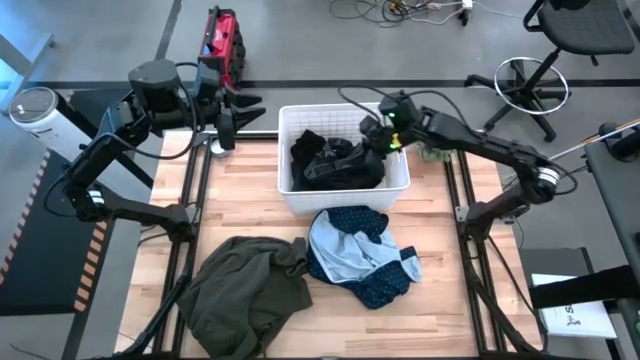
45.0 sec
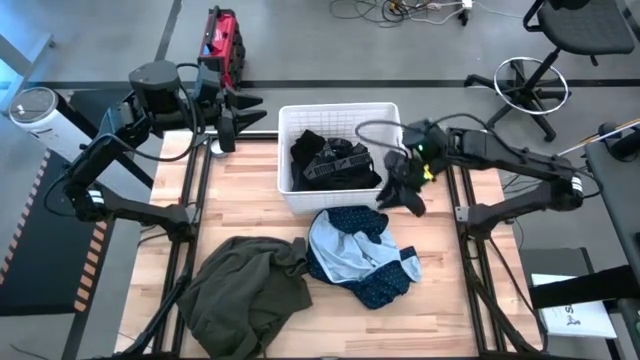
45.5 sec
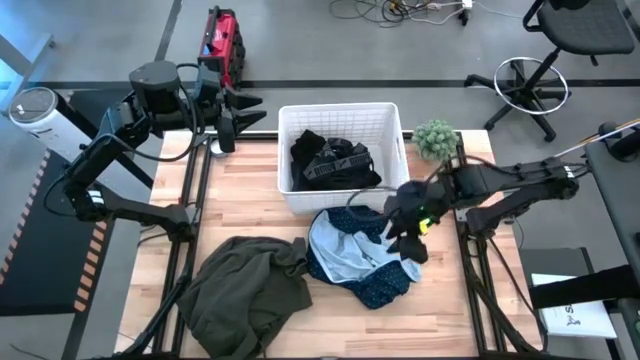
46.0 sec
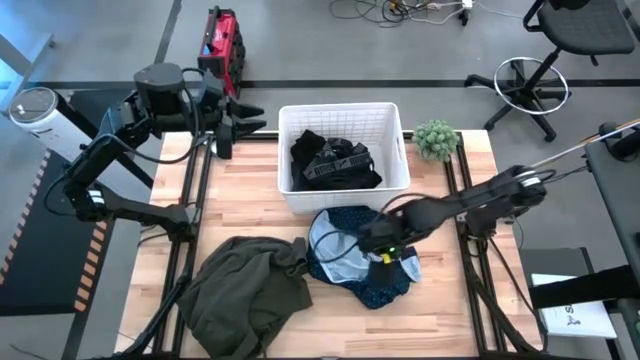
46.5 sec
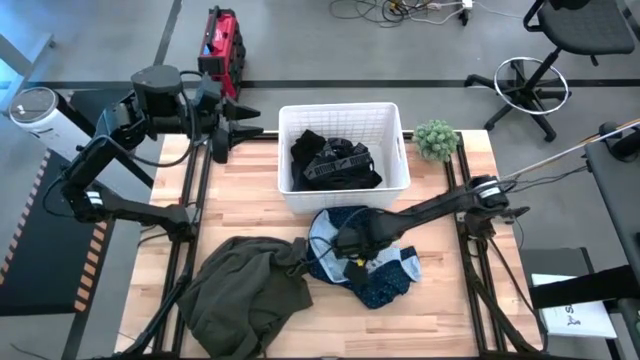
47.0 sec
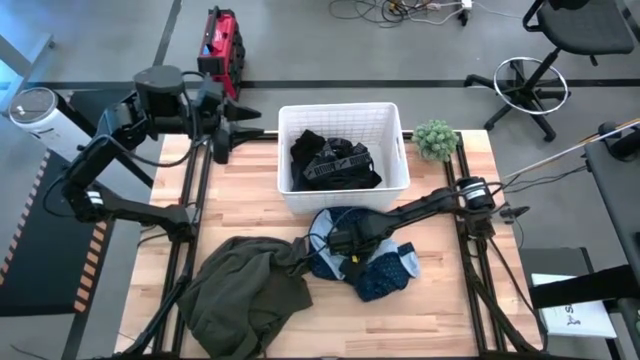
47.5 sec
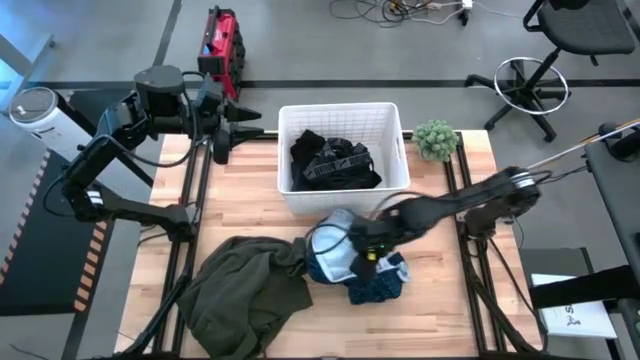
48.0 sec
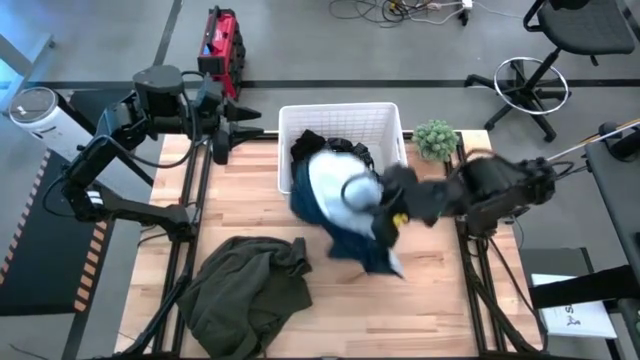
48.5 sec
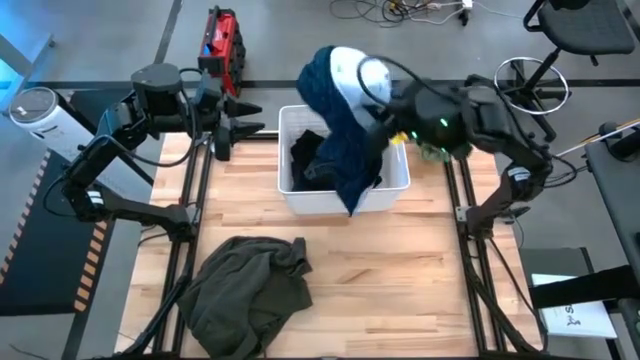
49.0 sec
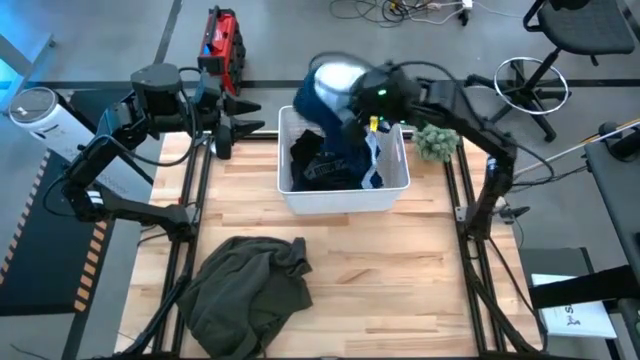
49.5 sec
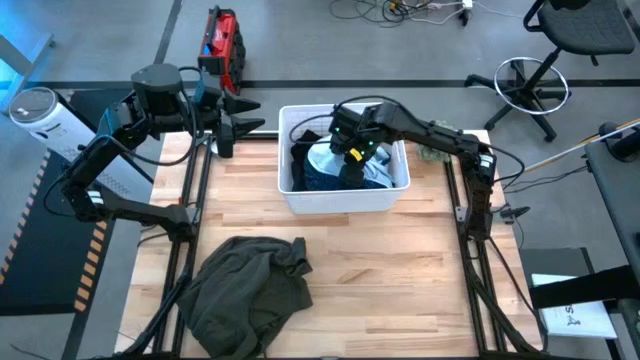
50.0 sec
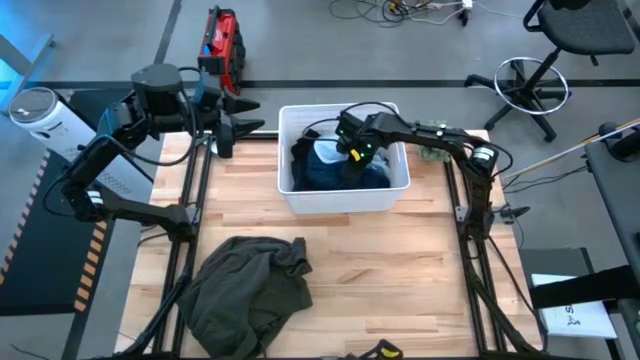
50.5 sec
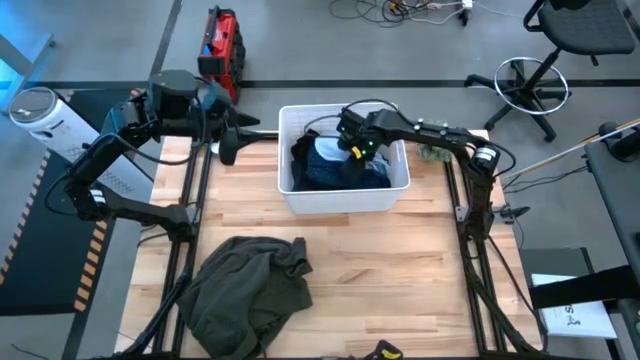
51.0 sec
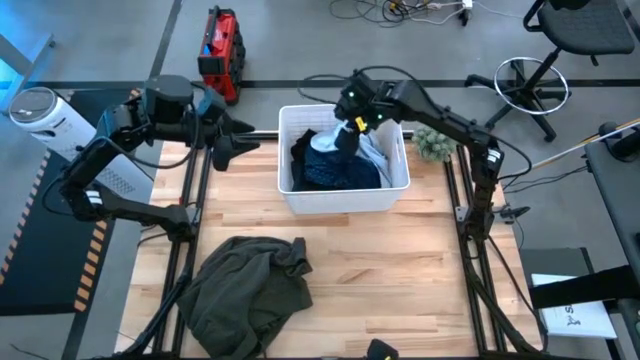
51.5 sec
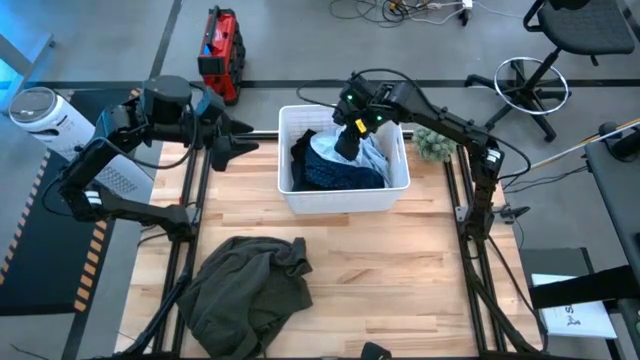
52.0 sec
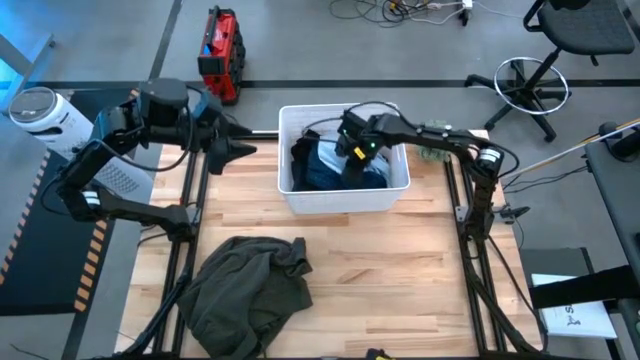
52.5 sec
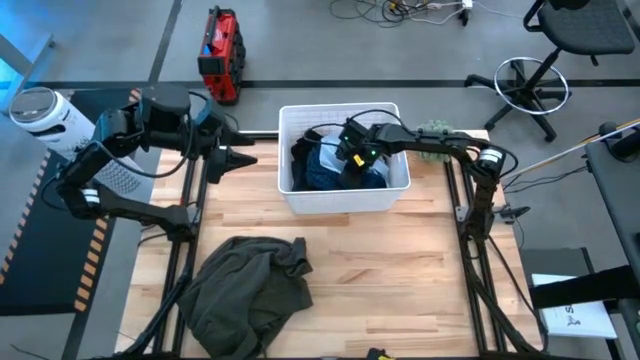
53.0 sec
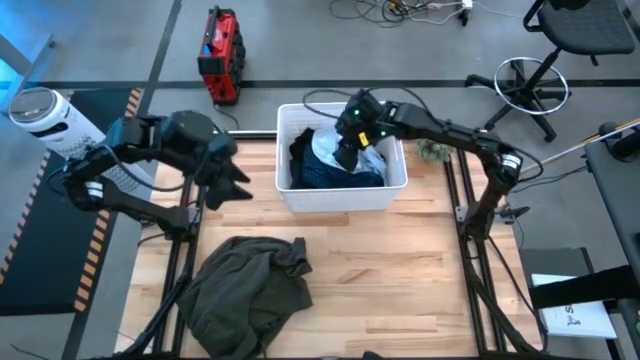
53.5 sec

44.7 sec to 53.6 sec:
Task: Sort clothes
Put the blue shirt into the white bin

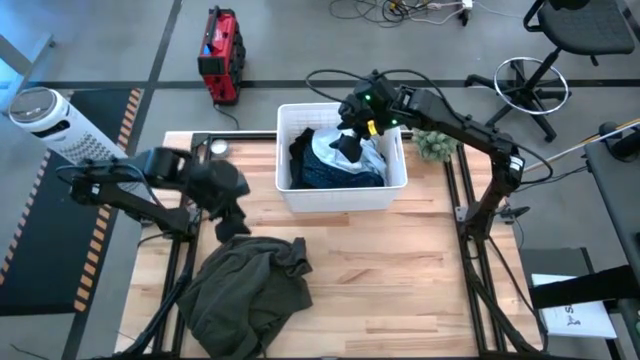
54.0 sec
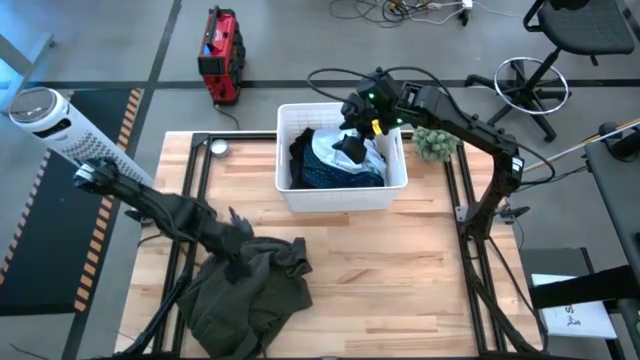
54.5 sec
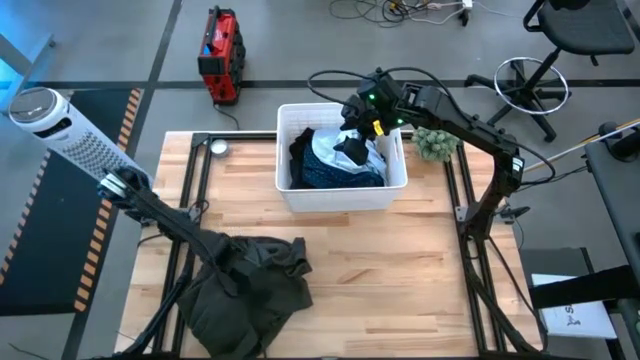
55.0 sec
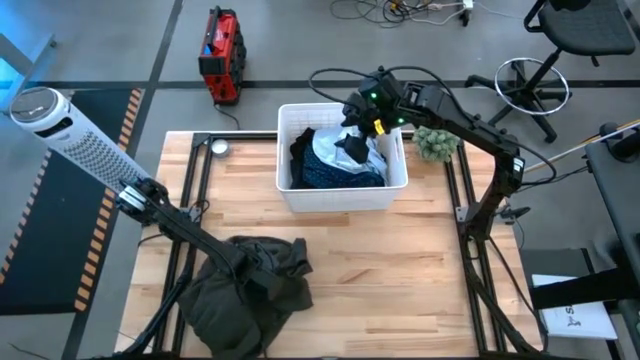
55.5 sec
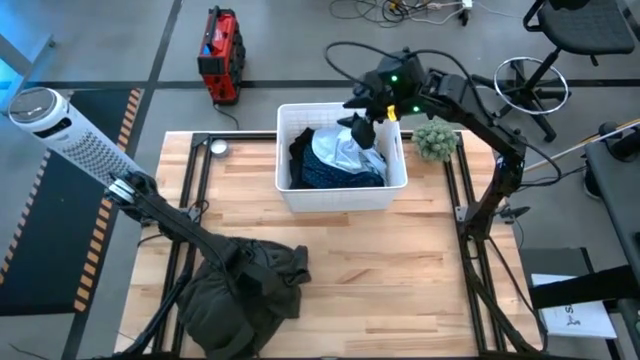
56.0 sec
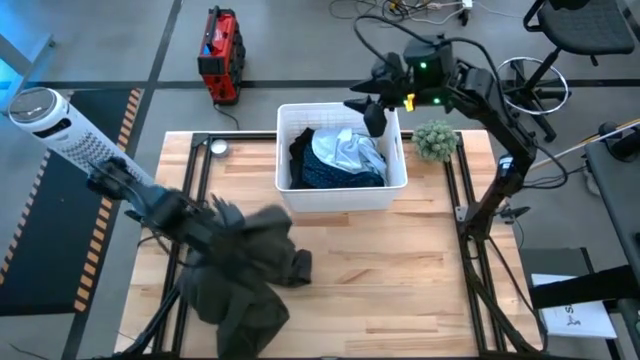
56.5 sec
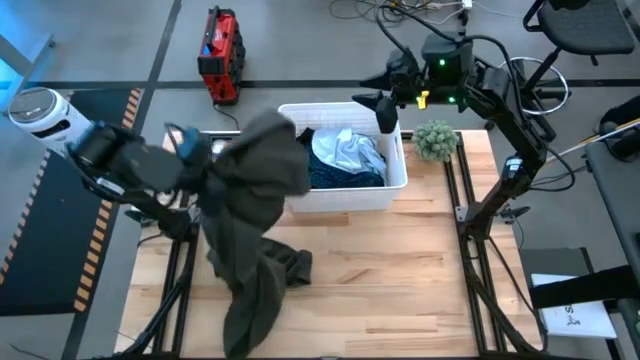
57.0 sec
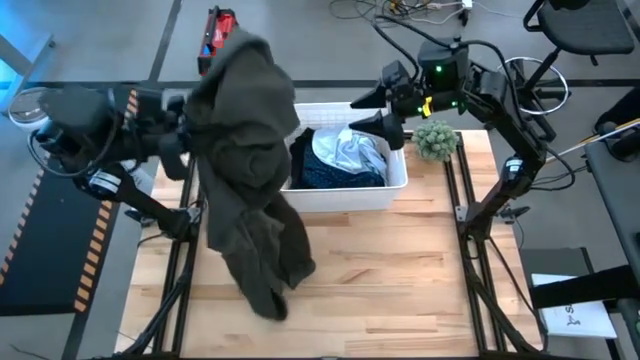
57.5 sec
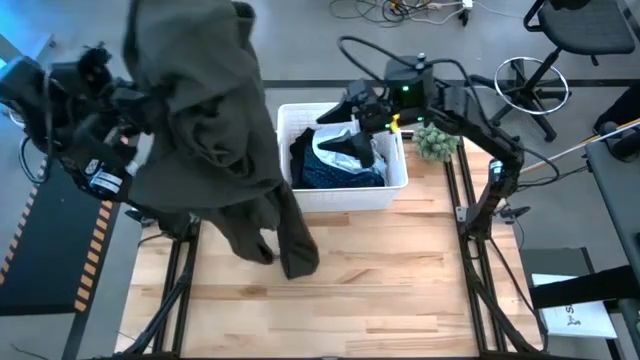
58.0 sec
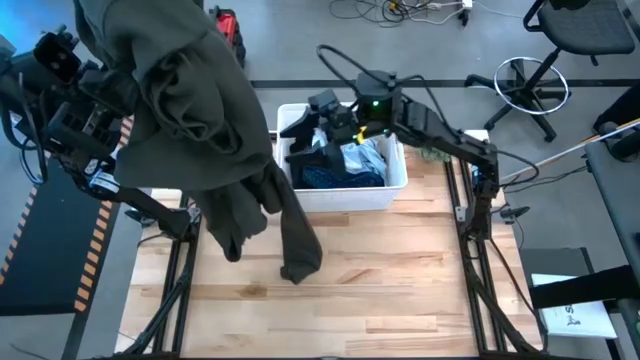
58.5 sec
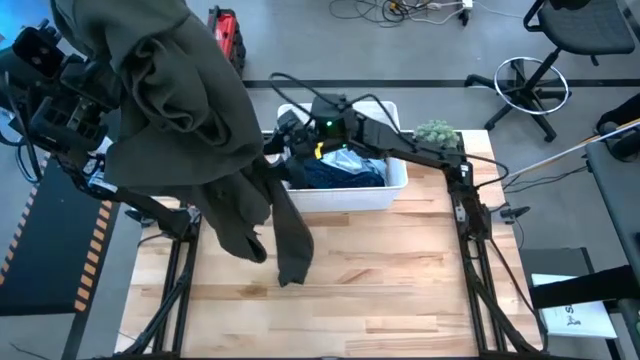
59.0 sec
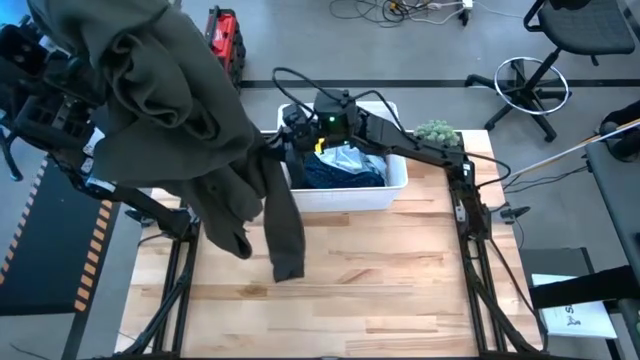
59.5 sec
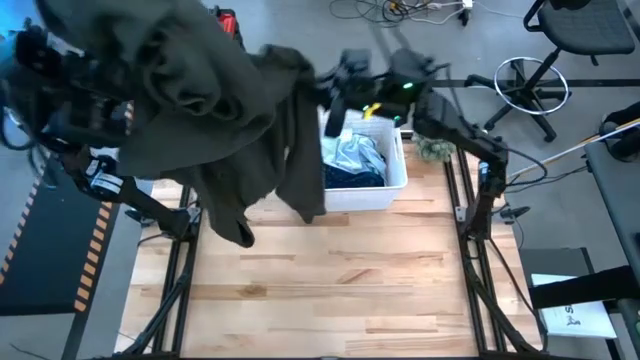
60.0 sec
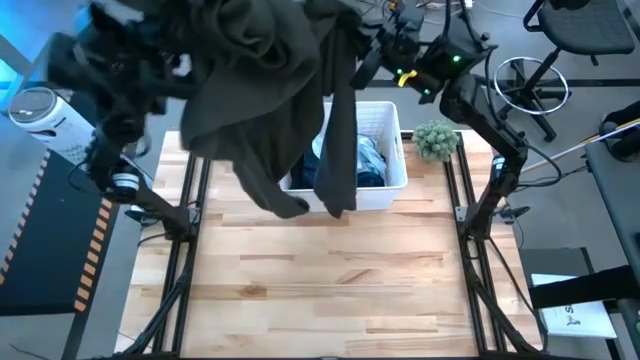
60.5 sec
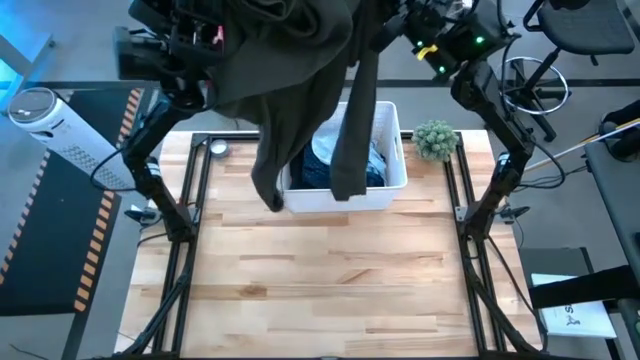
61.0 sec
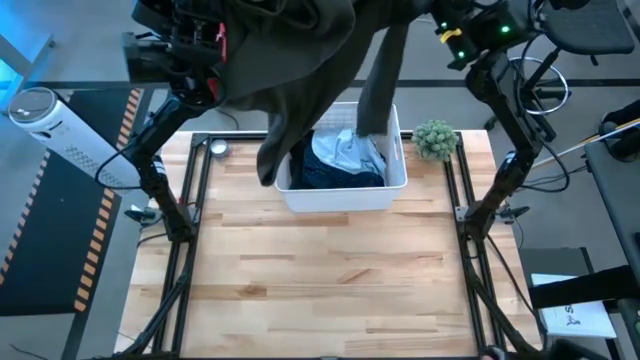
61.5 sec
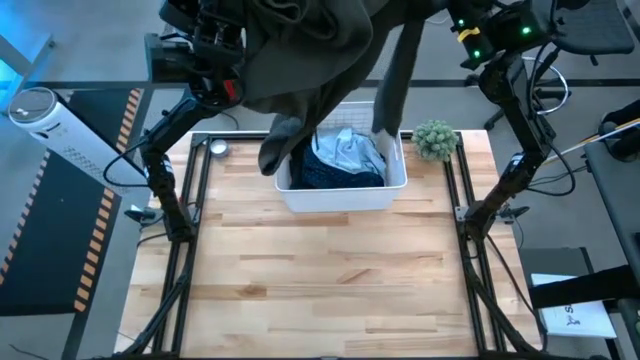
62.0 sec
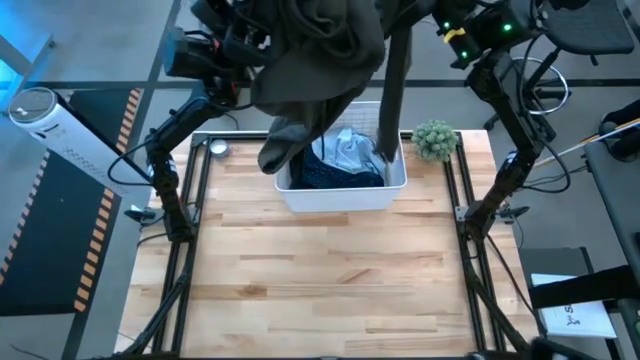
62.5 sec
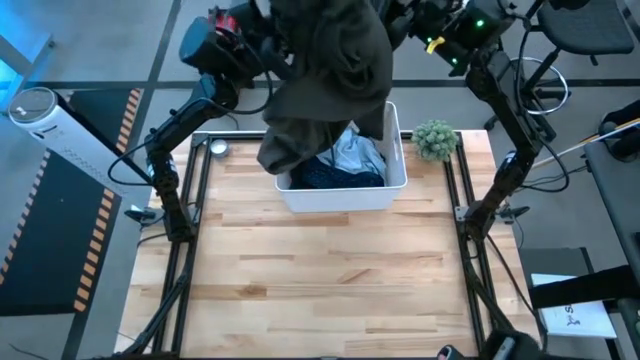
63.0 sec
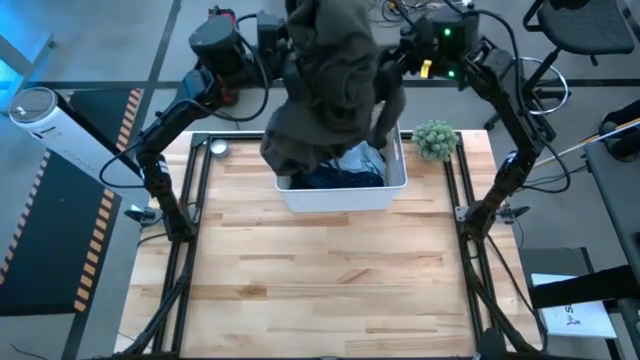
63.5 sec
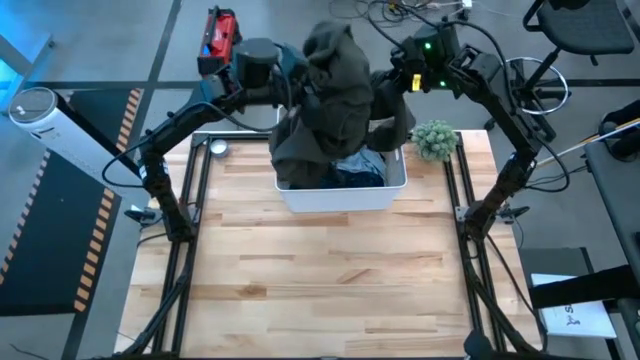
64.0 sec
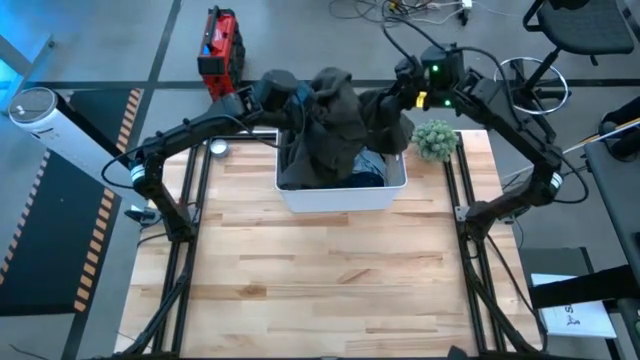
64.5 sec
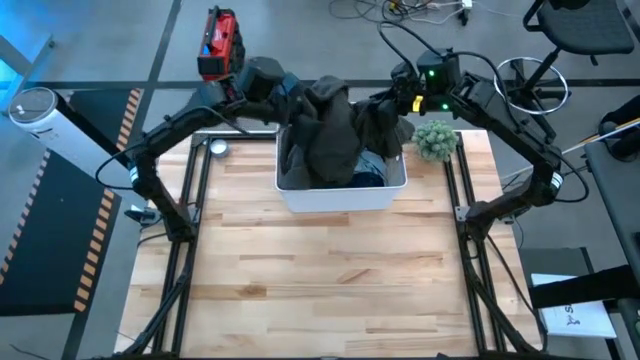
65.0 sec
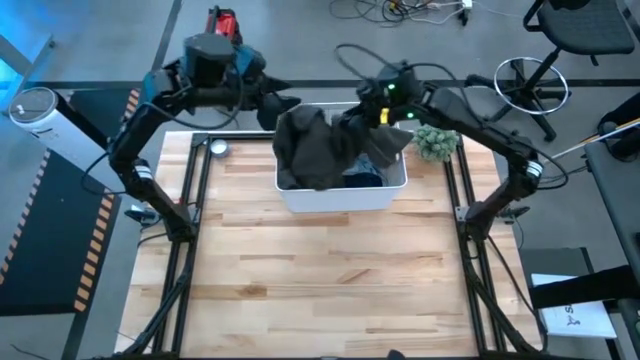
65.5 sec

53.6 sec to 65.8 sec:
Put the black jacket into the white bin

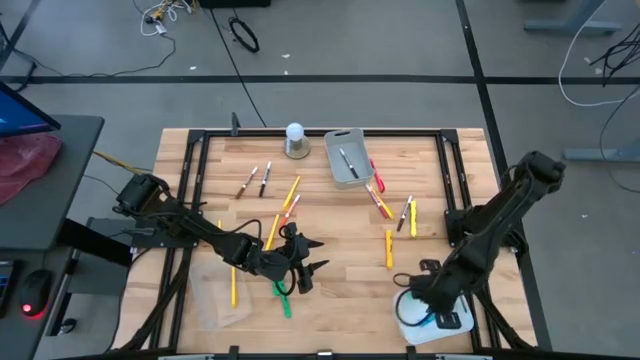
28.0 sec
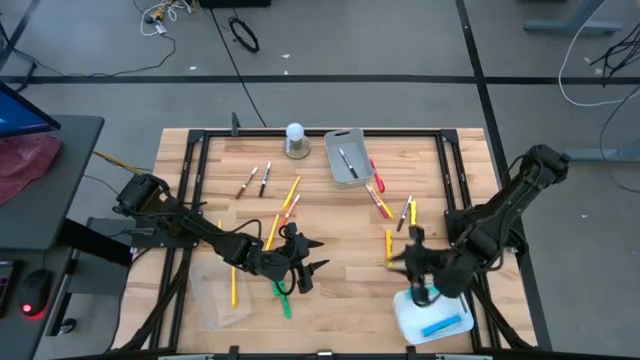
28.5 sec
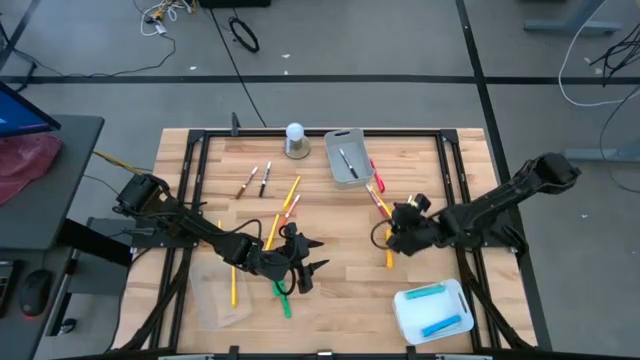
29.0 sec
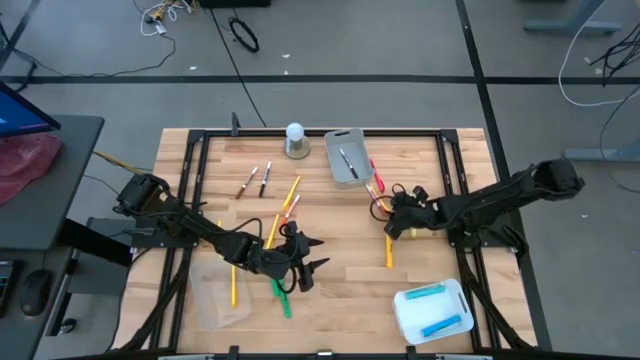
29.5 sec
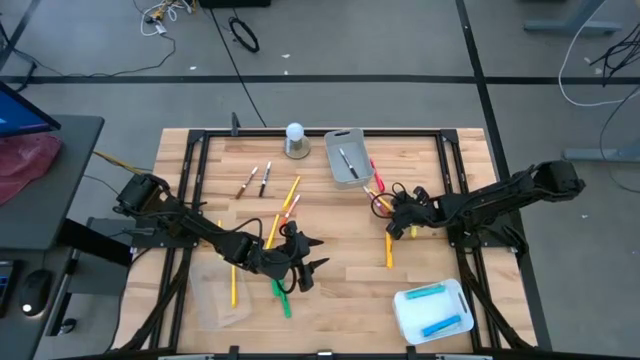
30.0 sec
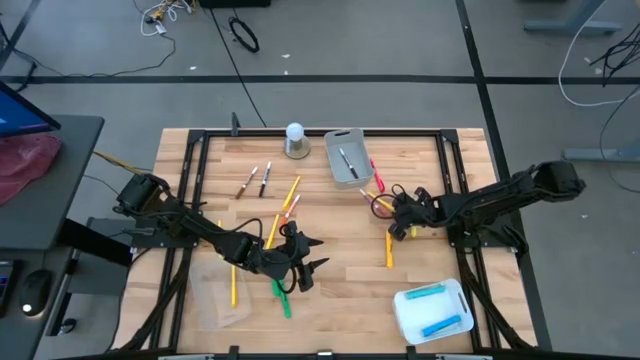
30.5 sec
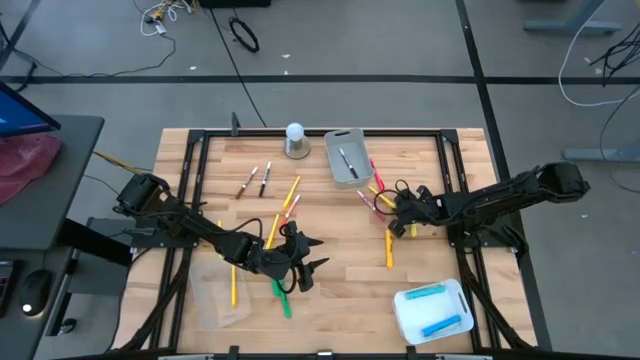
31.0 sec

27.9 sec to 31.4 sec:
Task: Pick & Place Markers
Put the yellow pen into the transparent bin
